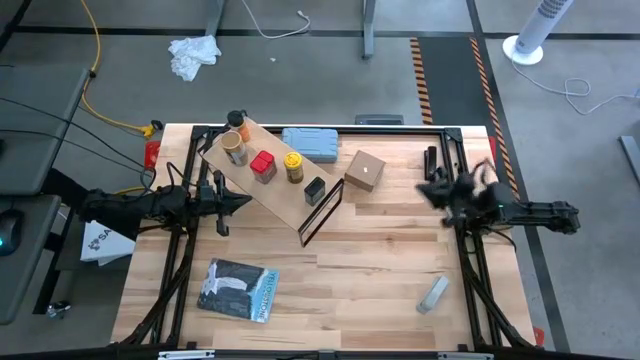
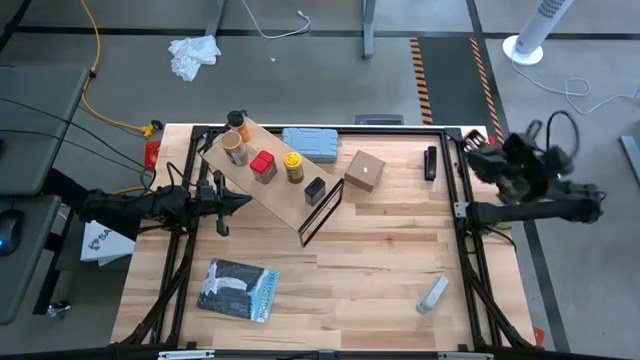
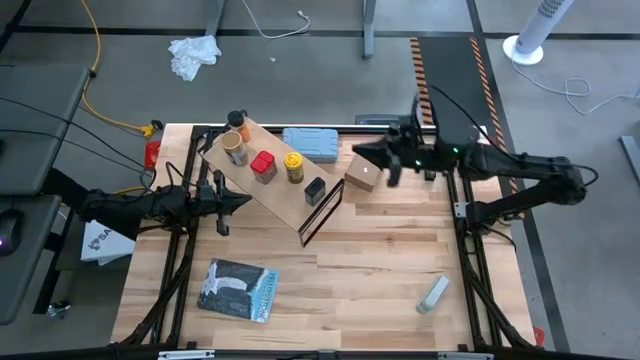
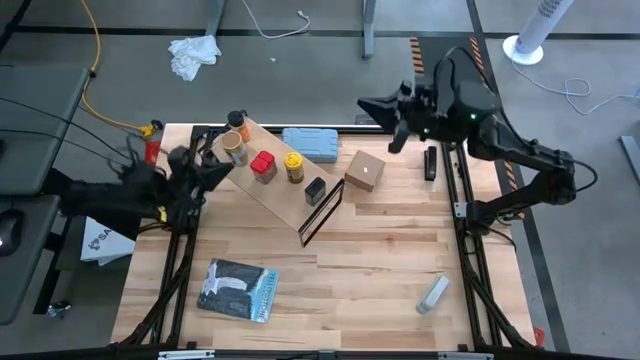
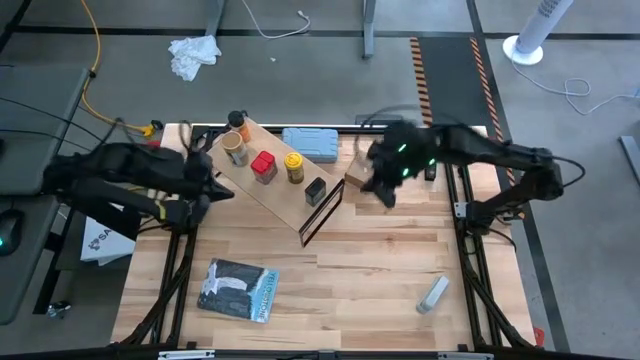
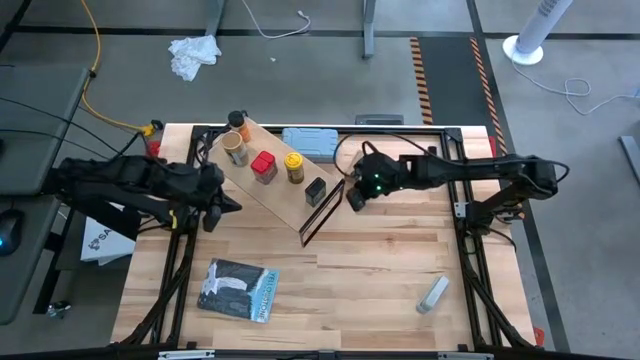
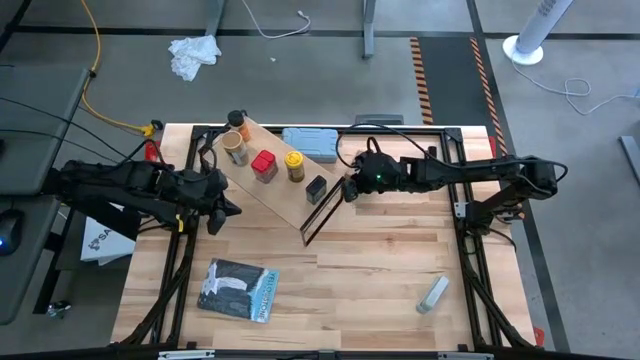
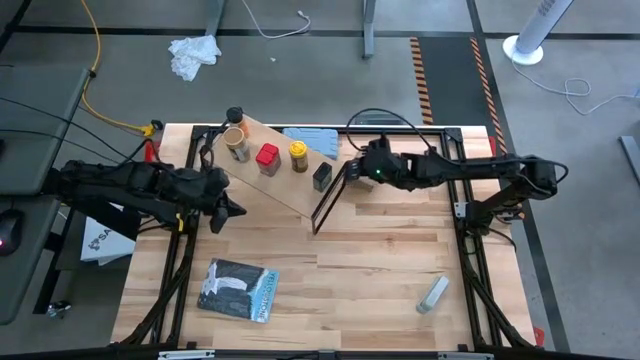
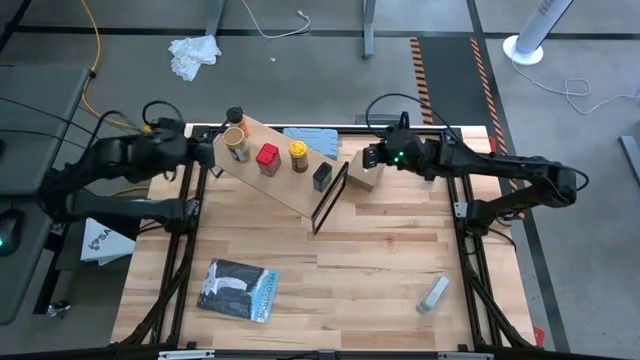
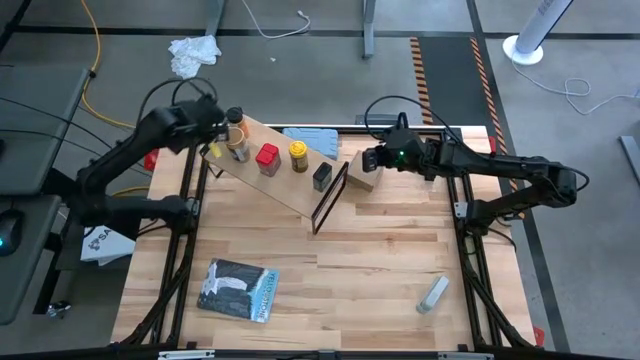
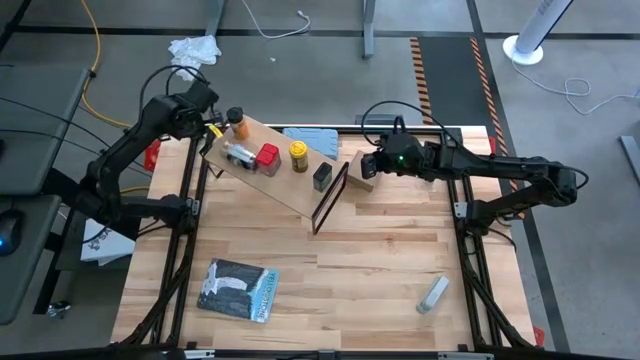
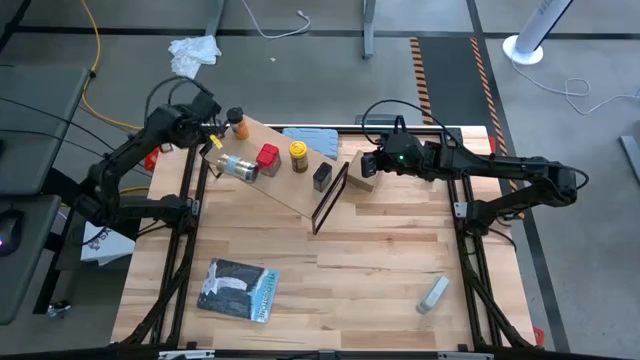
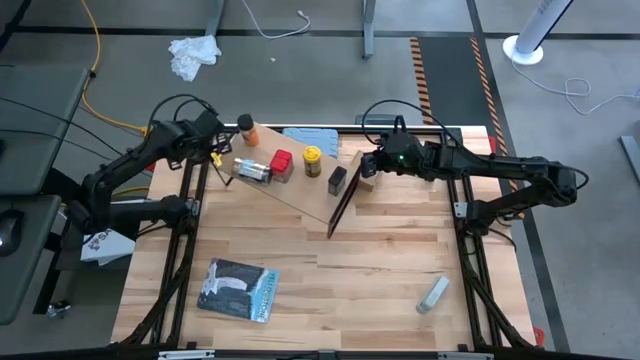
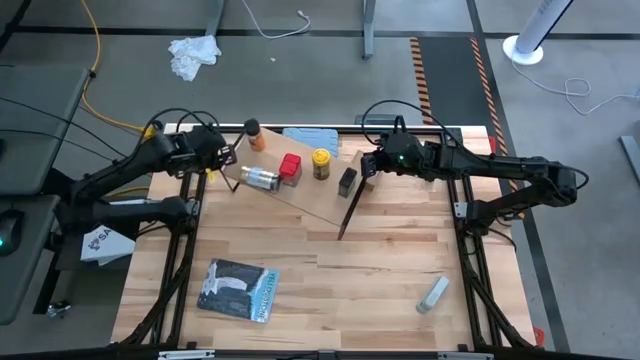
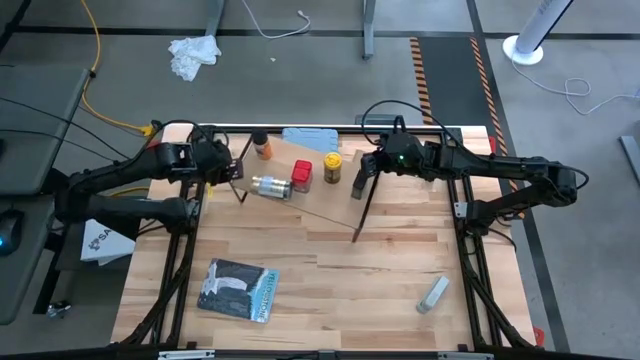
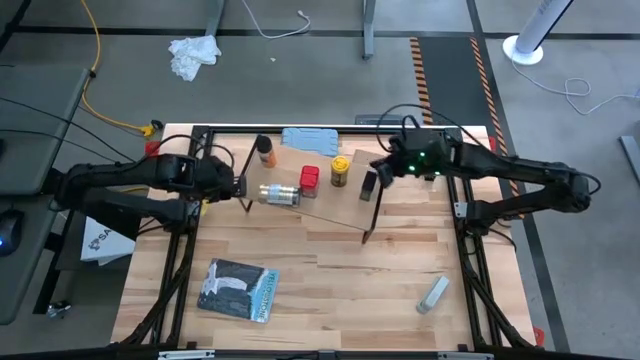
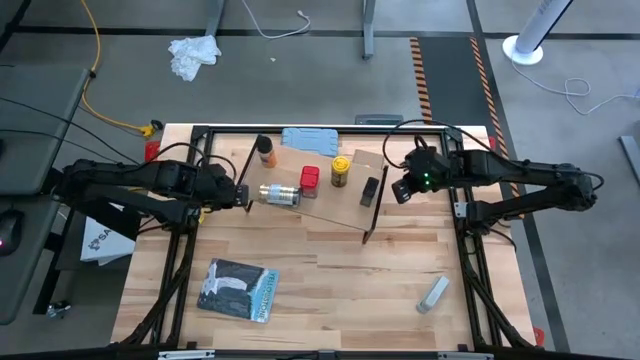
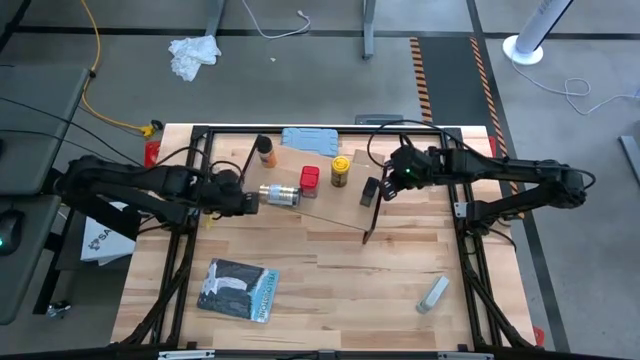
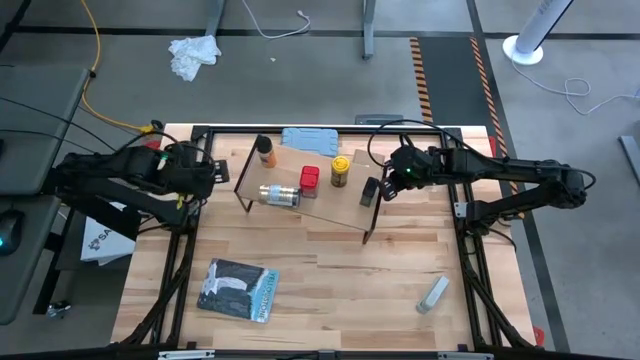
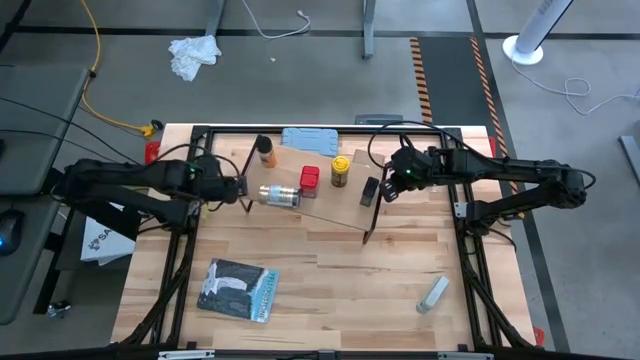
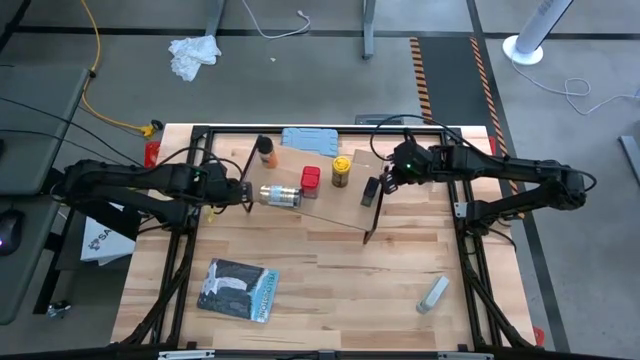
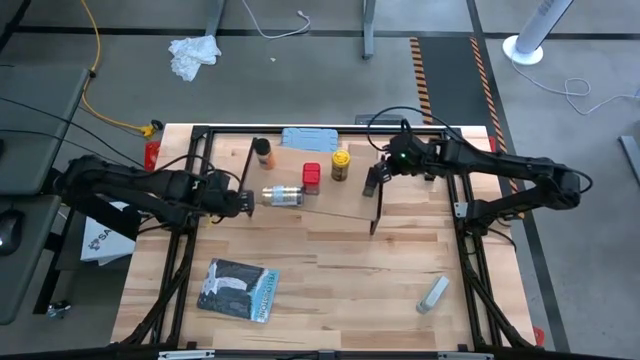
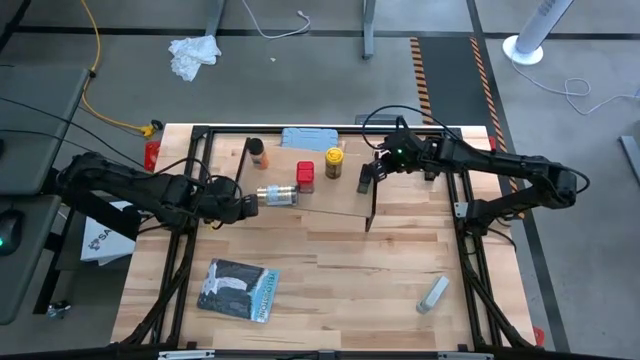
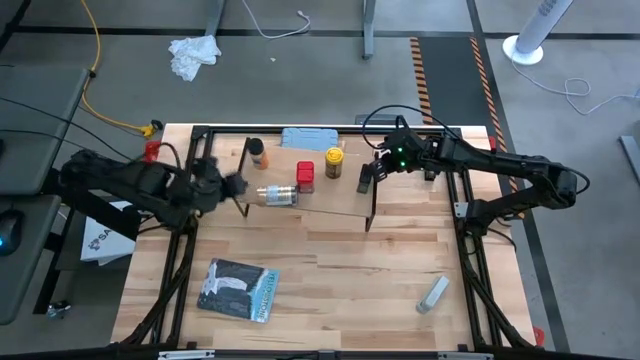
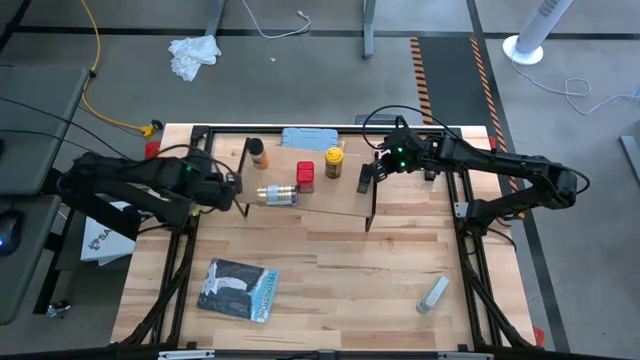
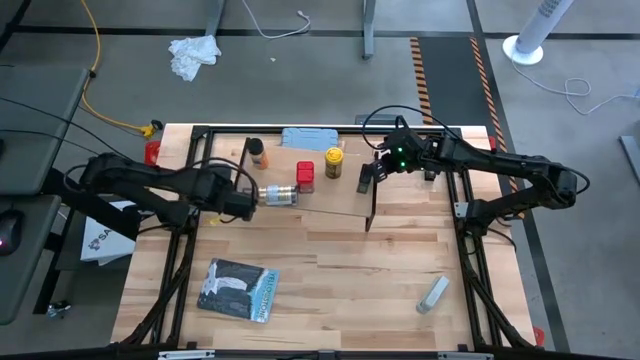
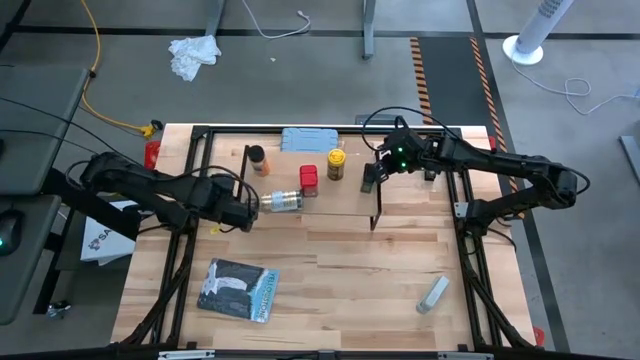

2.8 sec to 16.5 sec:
Task: Shelf spices
Move the shelf to the top center on the table

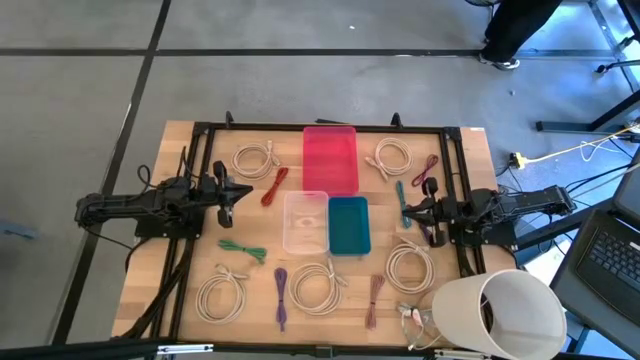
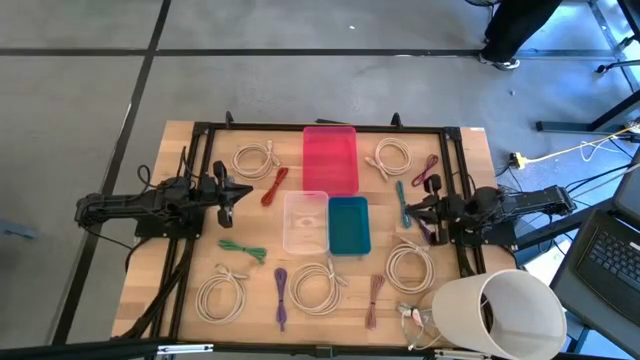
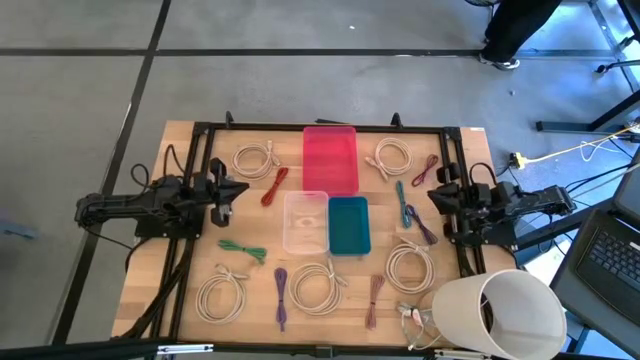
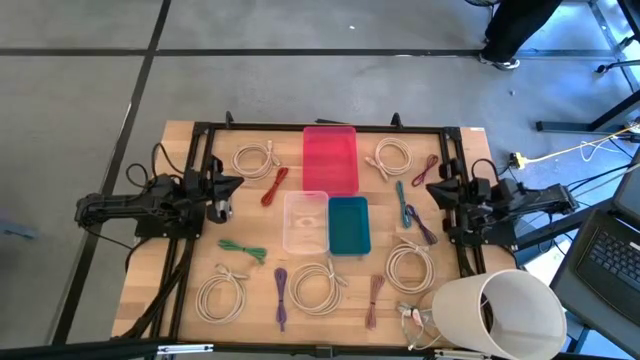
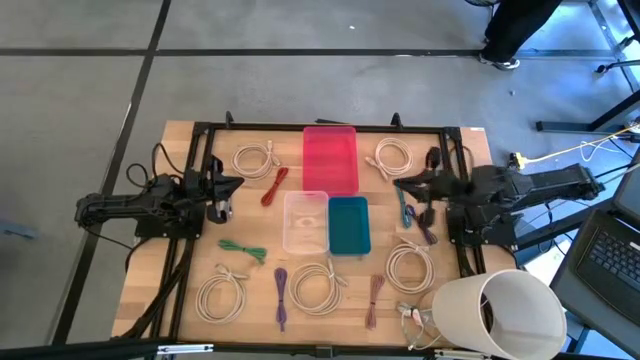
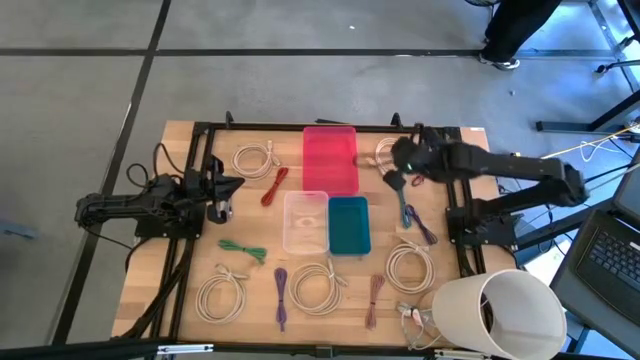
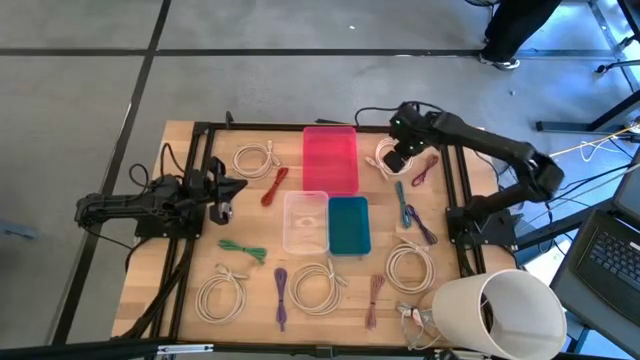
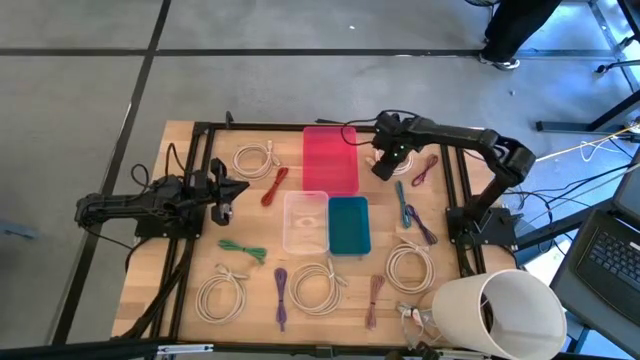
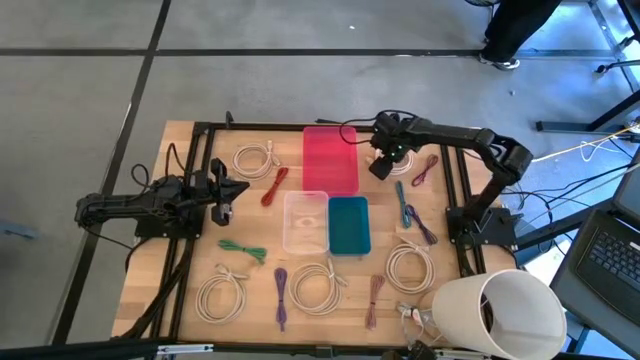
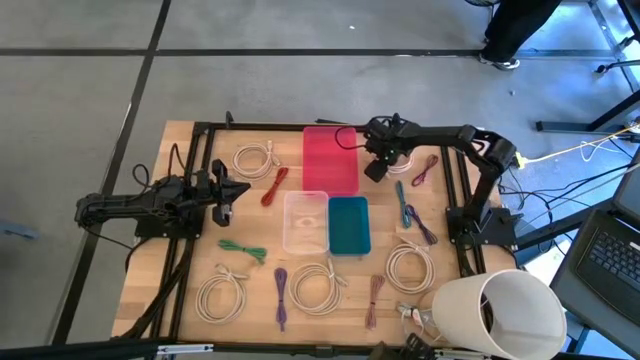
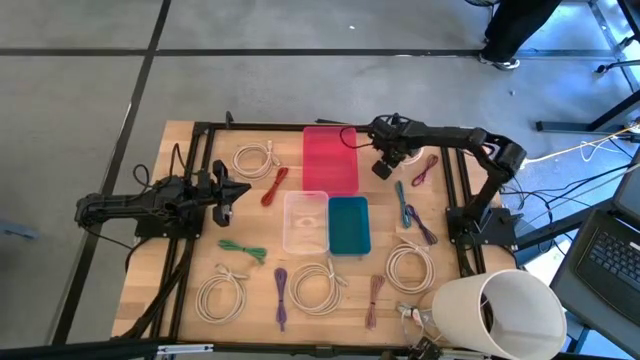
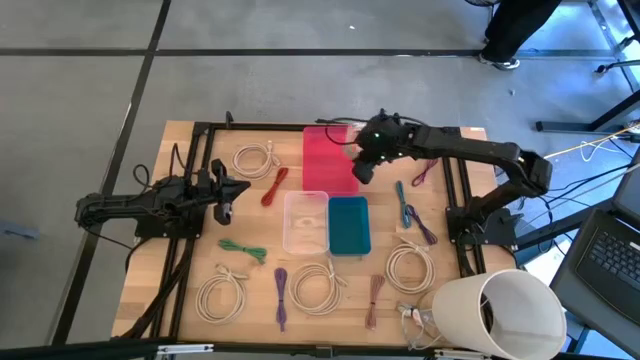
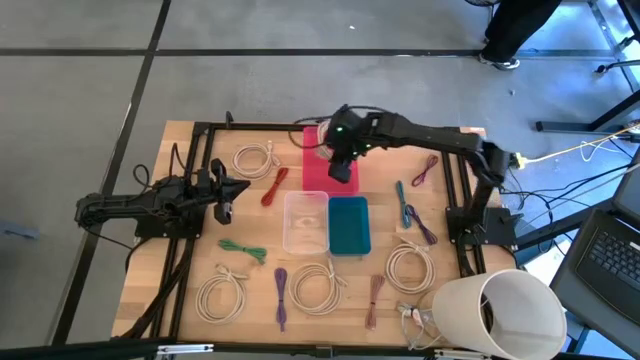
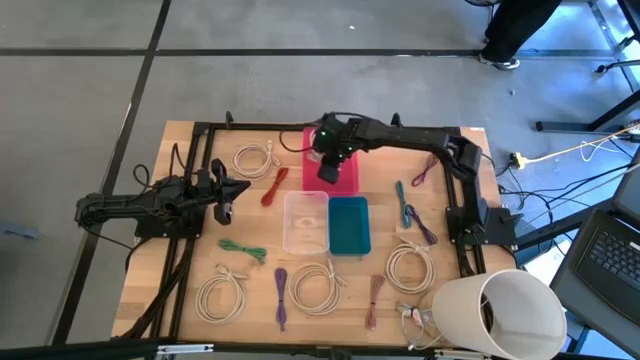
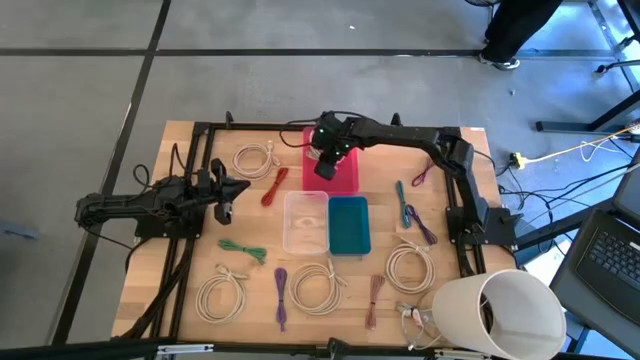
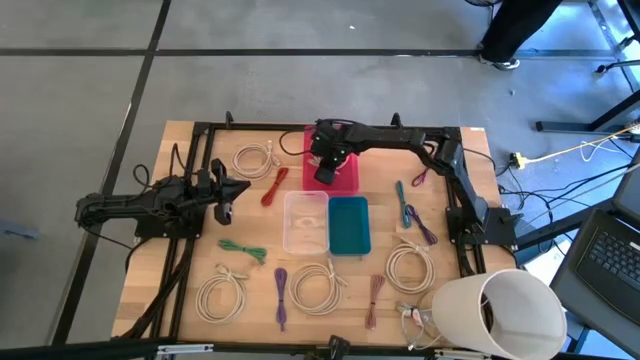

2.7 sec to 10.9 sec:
Task: Pick & Place USB Port
Put the brown HDMI cable into the pink bin
